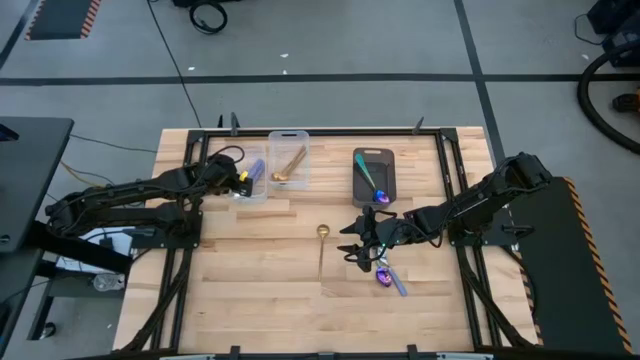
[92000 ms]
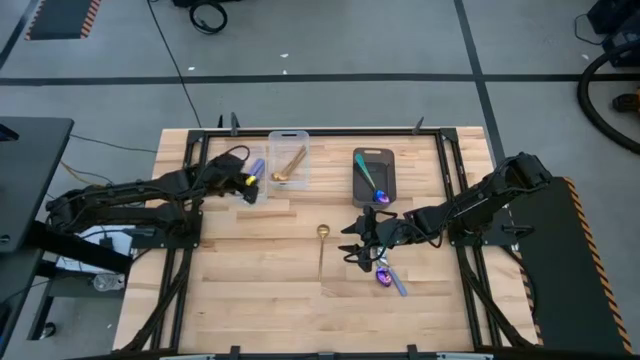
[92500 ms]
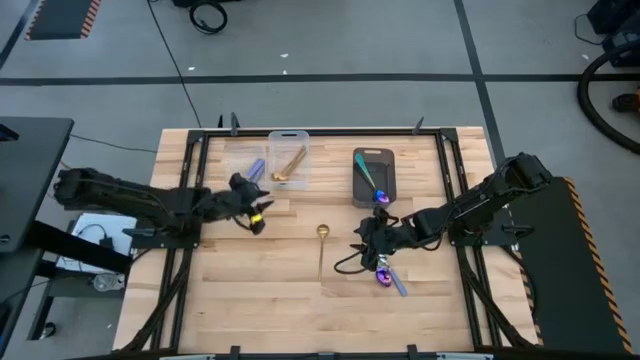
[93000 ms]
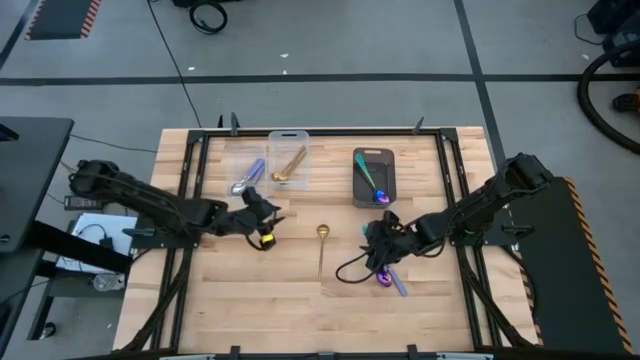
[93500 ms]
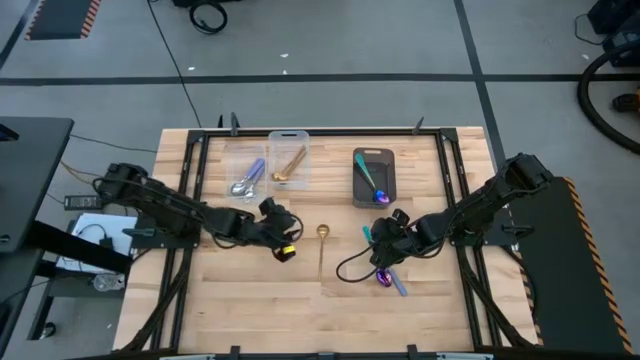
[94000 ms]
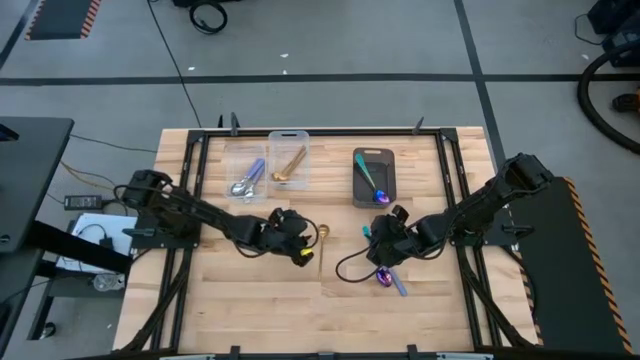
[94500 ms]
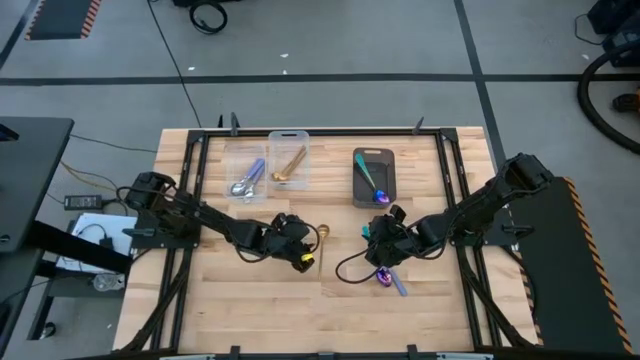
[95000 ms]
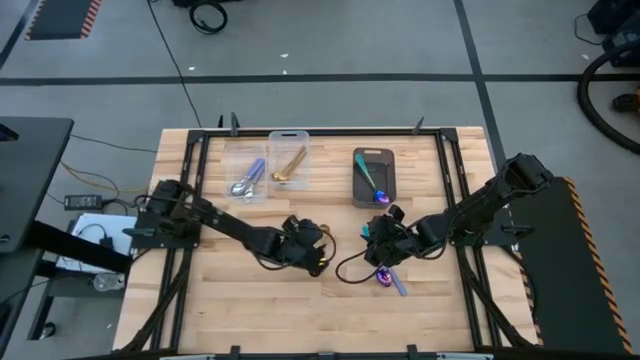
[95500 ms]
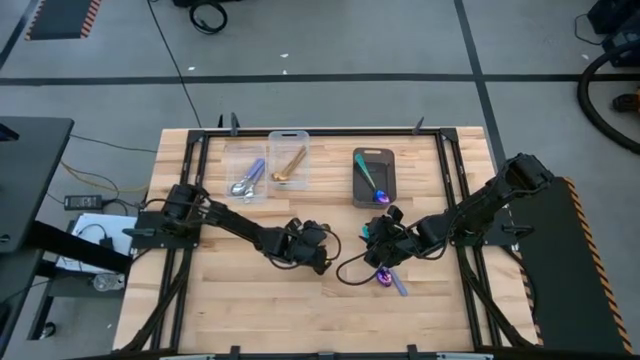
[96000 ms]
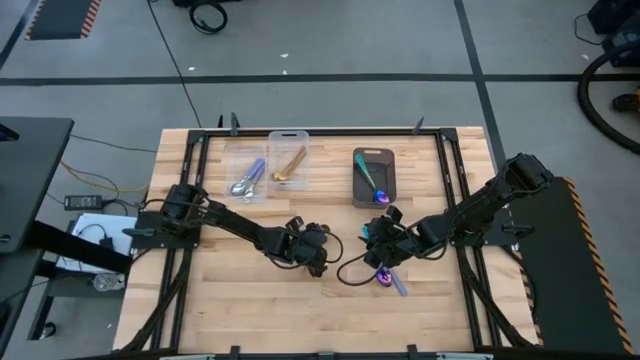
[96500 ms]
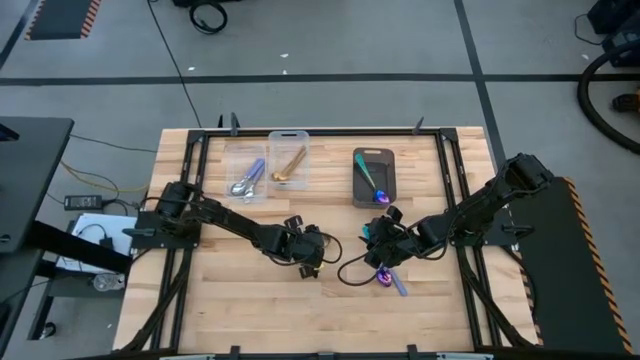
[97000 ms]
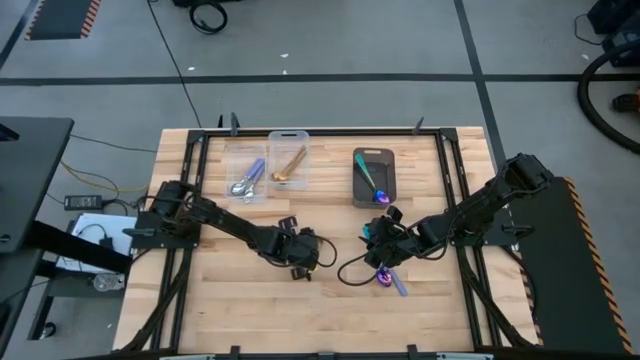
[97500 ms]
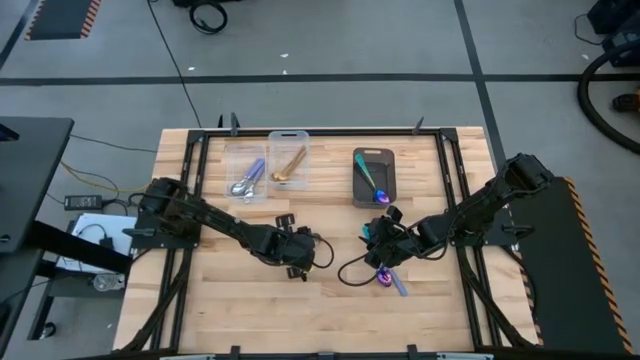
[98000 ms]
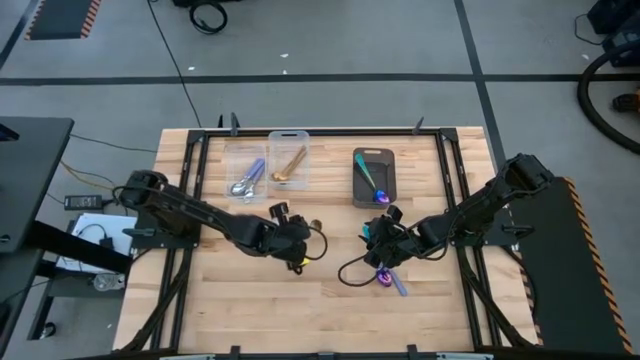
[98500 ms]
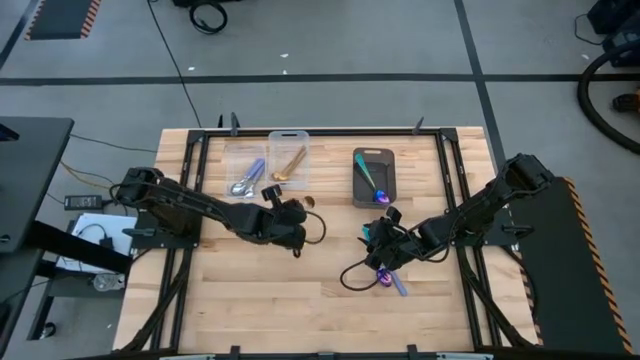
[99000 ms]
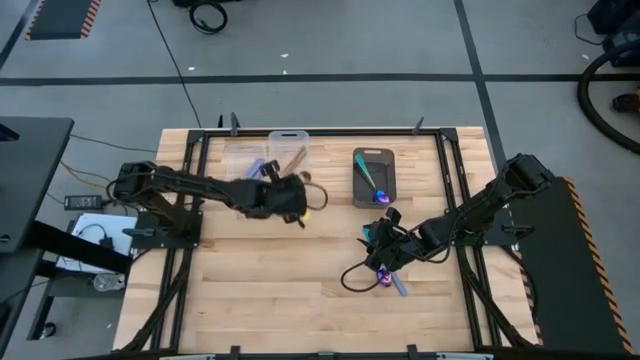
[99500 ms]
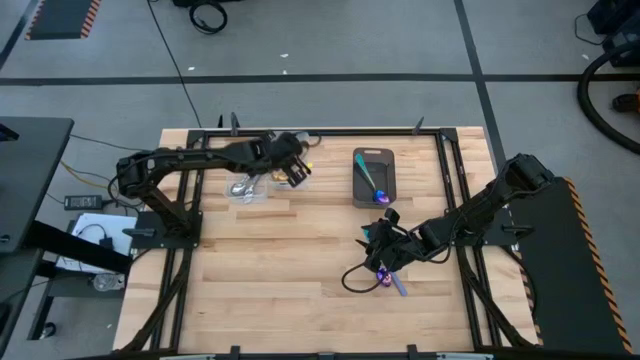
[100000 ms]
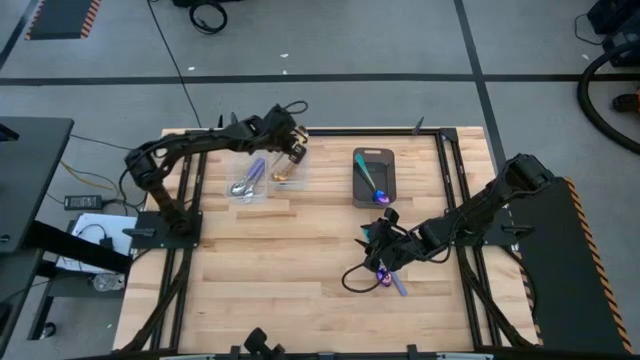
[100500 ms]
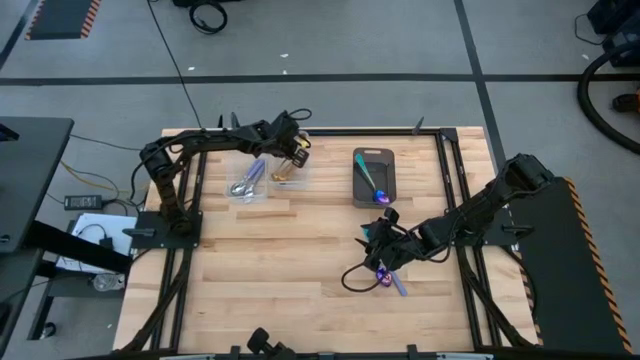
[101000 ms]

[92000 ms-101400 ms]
Task: Sort silverware by color (type)
Put the gold spoon into the right transparent bin

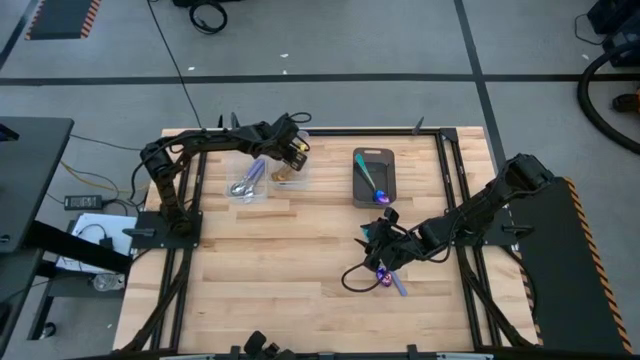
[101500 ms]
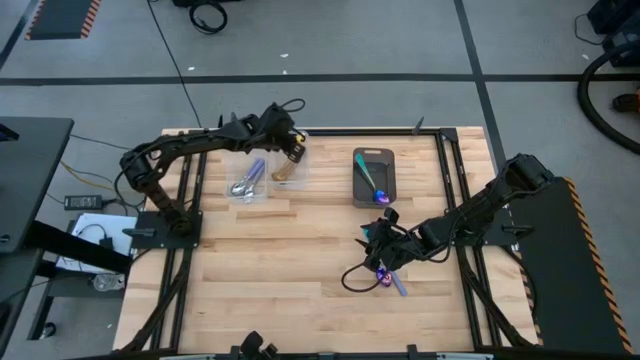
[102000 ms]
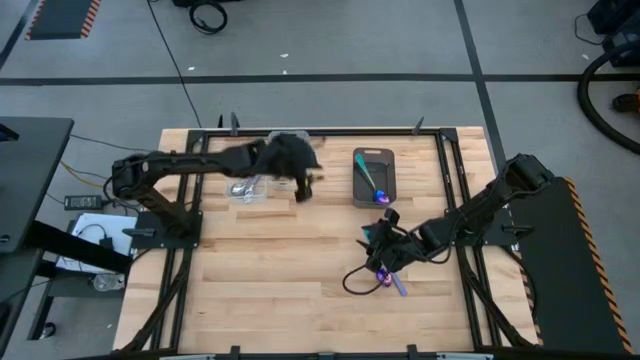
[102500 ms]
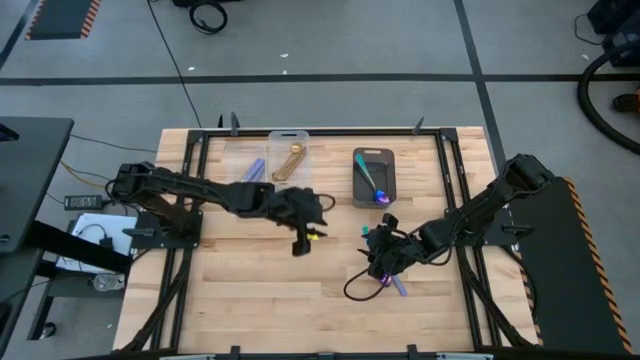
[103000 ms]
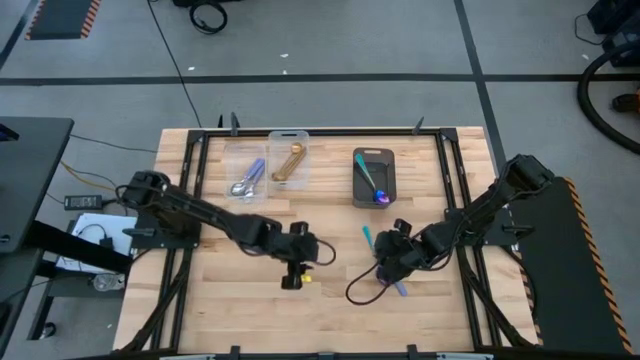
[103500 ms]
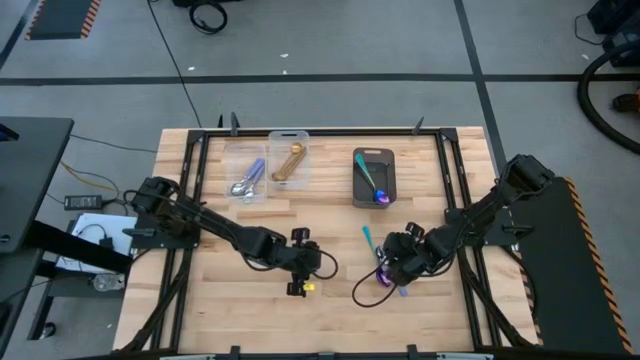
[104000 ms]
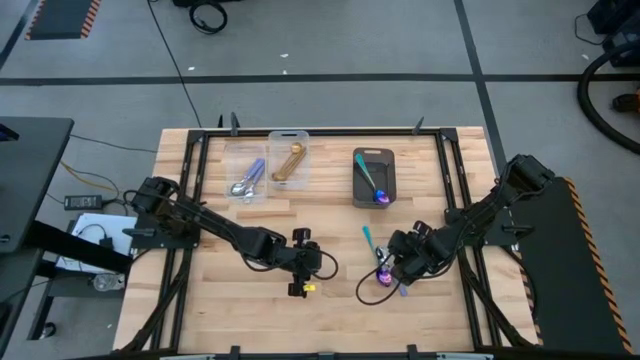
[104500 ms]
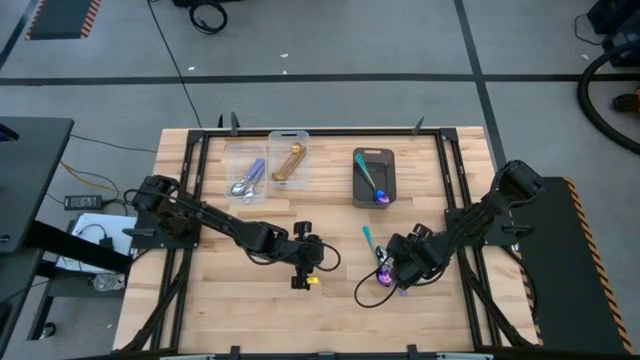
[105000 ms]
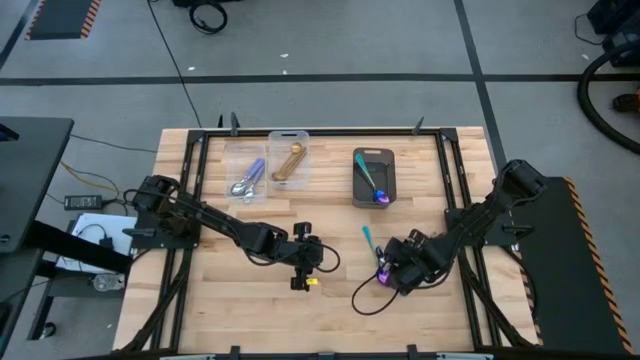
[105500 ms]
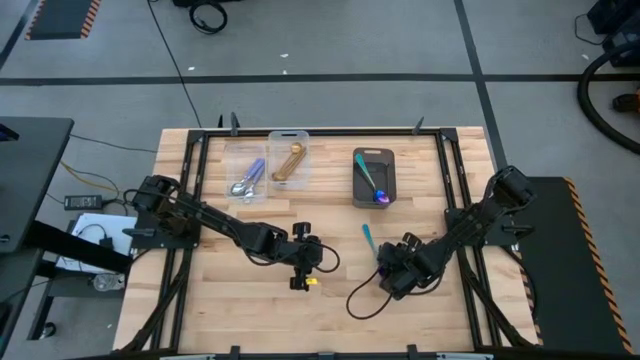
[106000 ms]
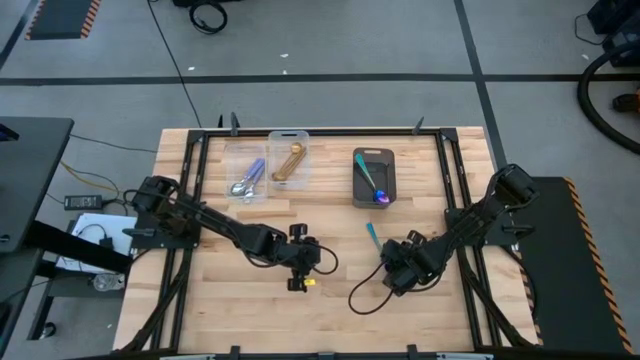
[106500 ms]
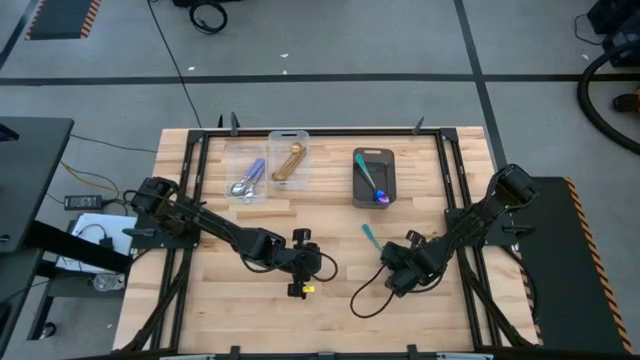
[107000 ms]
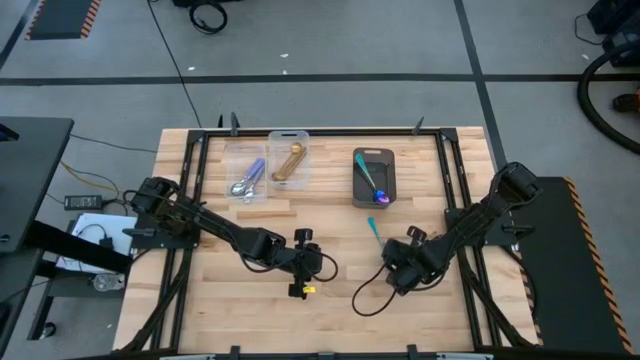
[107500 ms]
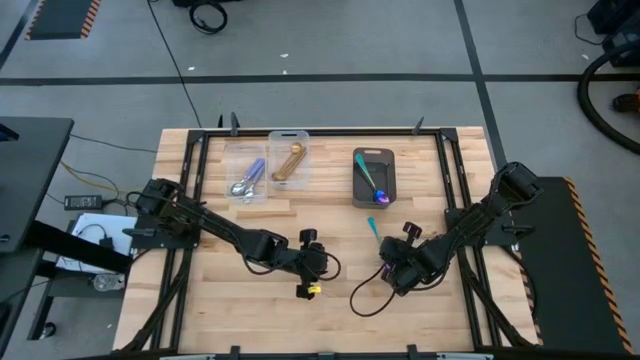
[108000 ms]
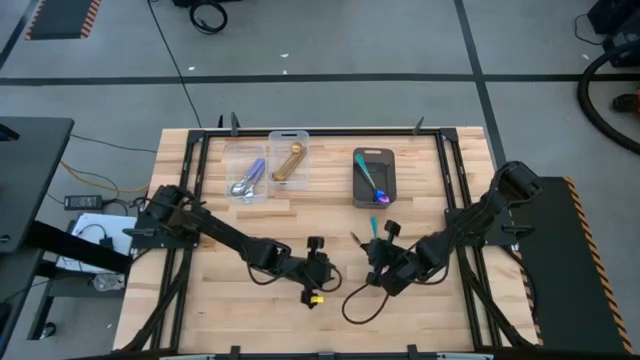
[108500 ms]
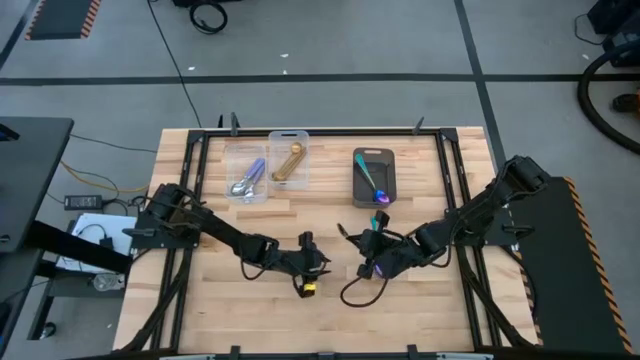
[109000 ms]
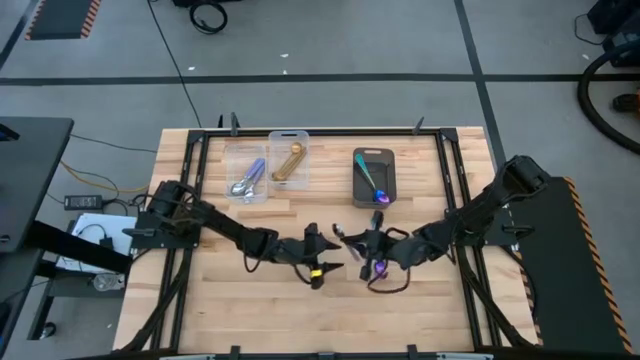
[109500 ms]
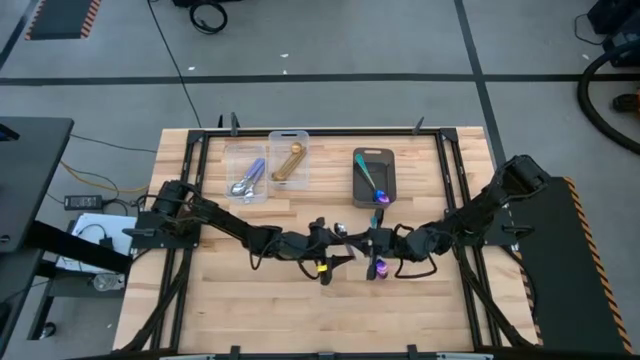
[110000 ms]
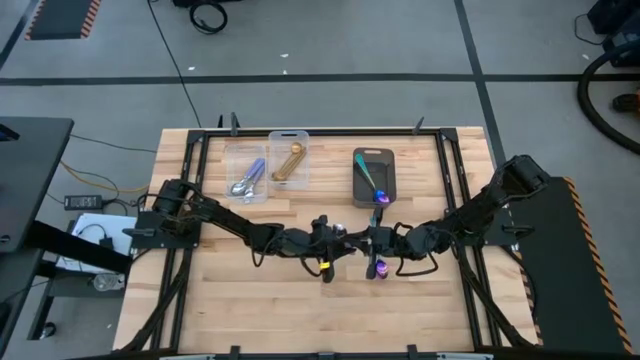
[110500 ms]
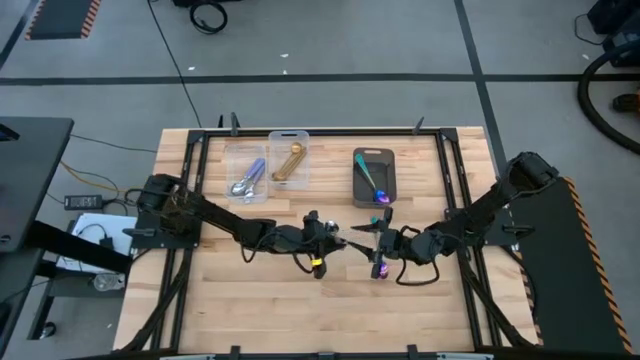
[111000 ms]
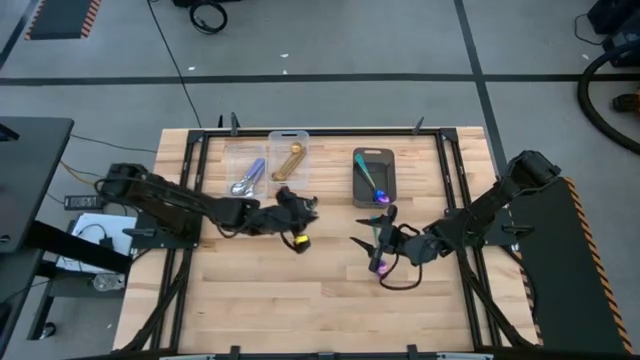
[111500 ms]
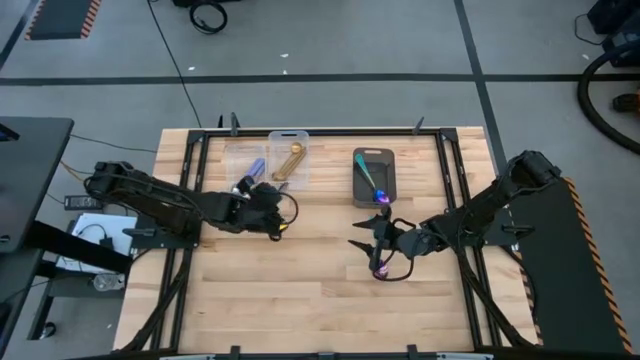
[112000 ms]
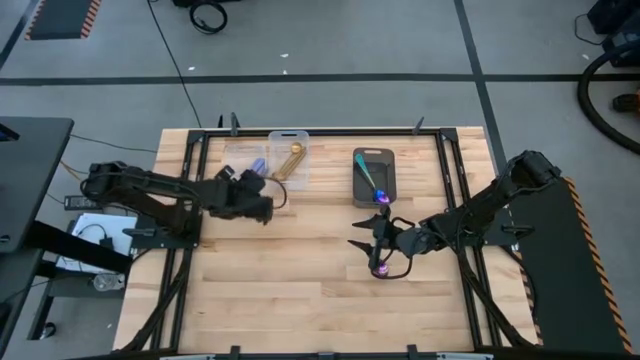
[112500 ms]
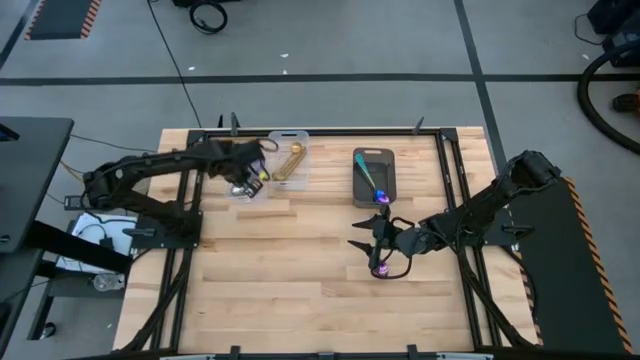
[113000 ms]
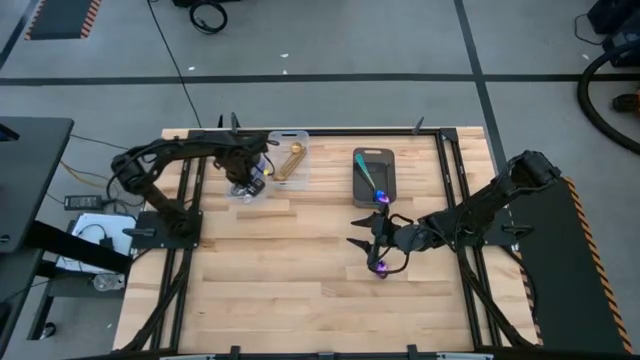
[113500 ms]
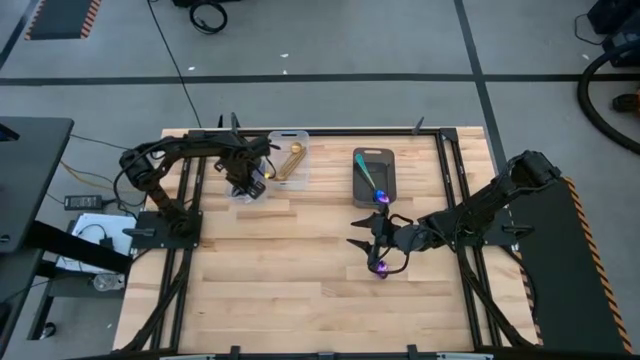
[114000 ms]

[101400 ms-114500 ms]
Put the purple spoon into the left transparent bin
